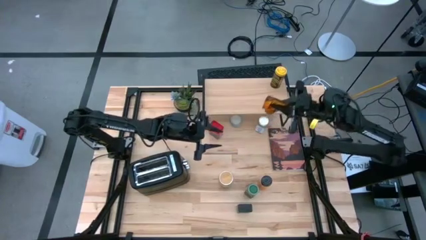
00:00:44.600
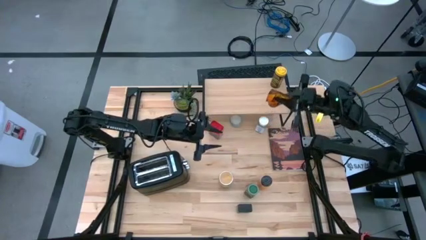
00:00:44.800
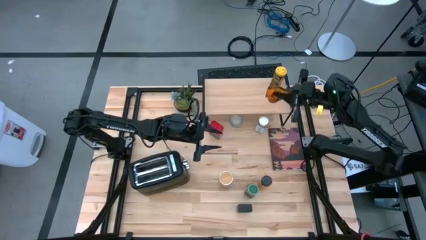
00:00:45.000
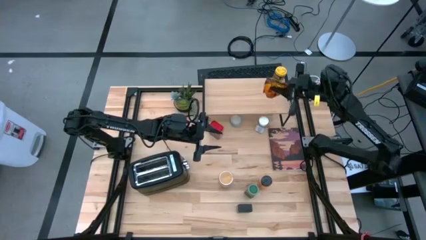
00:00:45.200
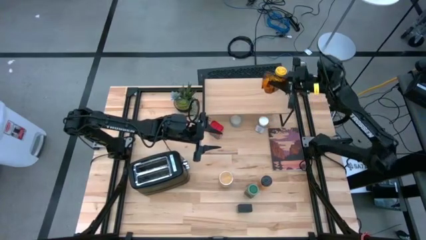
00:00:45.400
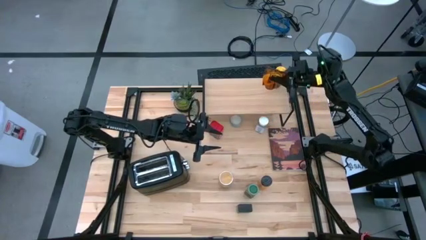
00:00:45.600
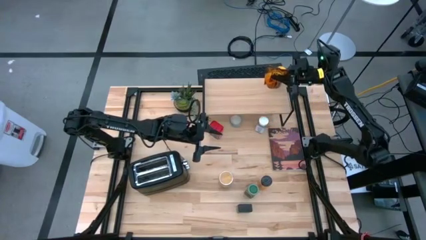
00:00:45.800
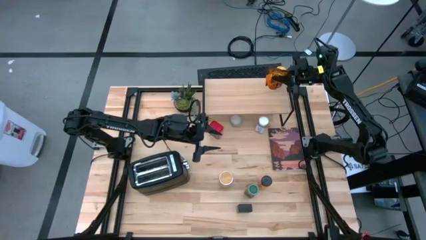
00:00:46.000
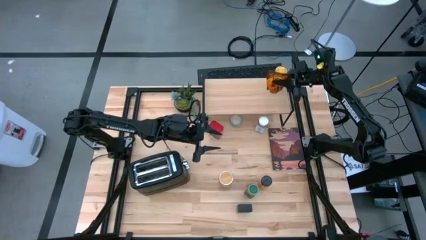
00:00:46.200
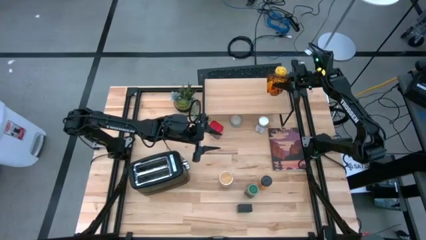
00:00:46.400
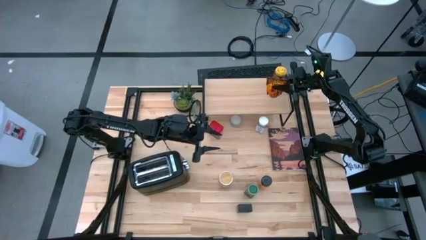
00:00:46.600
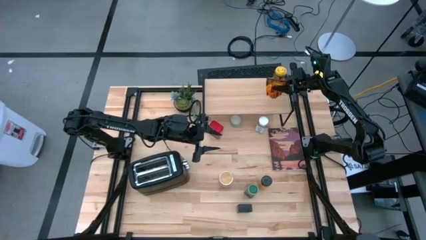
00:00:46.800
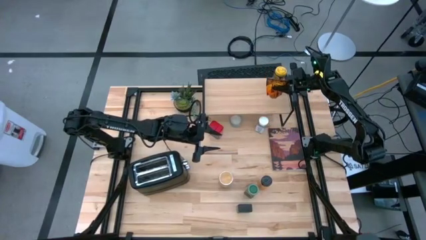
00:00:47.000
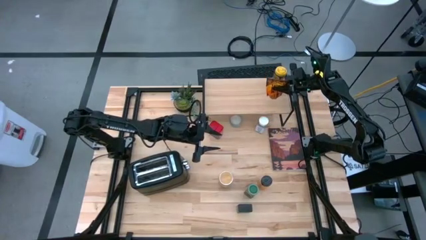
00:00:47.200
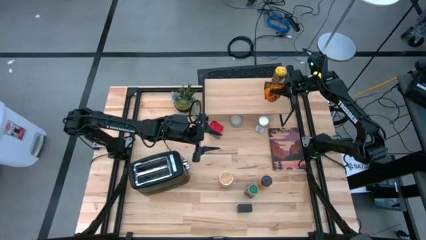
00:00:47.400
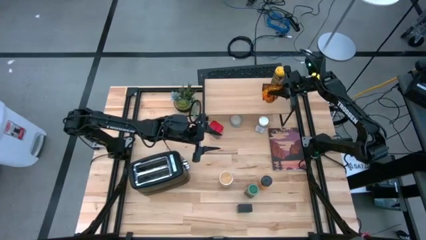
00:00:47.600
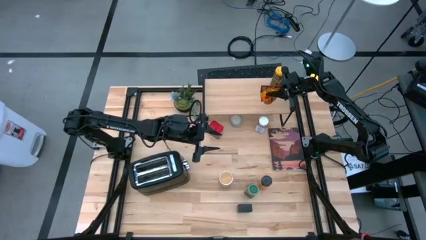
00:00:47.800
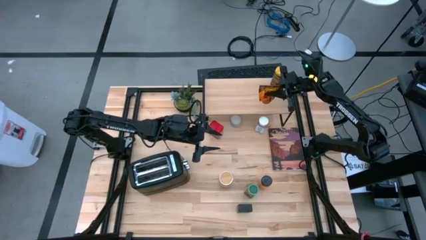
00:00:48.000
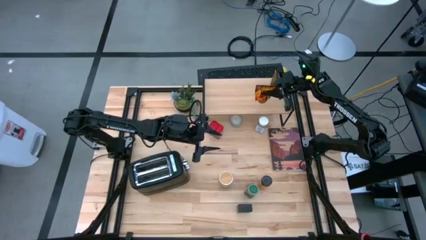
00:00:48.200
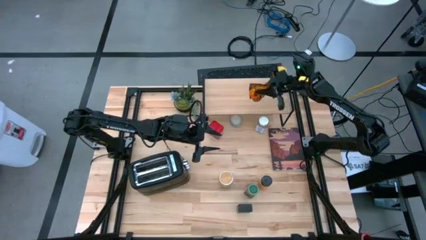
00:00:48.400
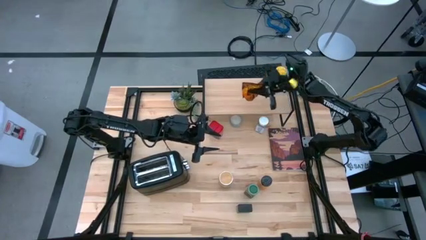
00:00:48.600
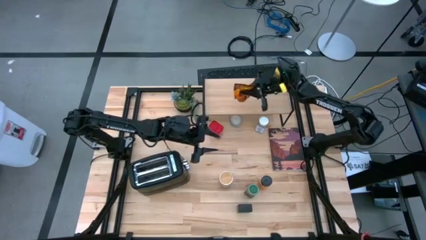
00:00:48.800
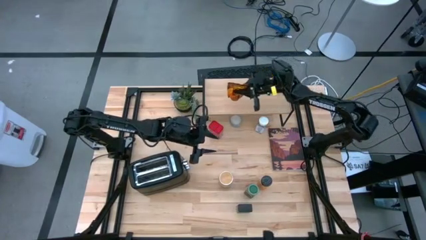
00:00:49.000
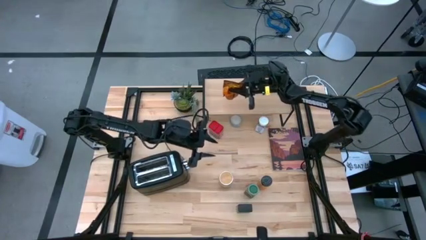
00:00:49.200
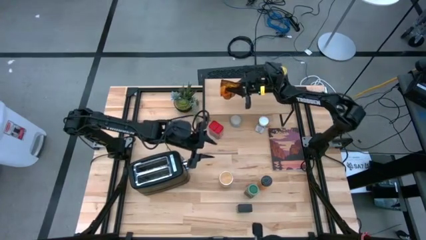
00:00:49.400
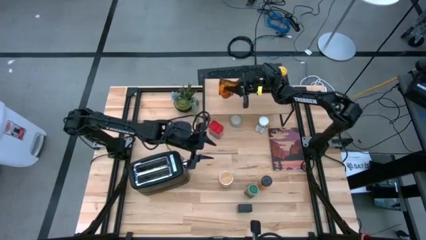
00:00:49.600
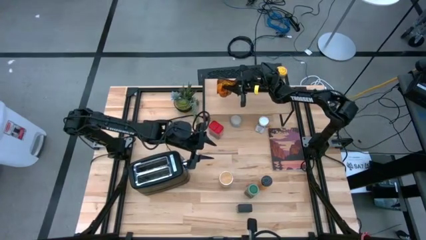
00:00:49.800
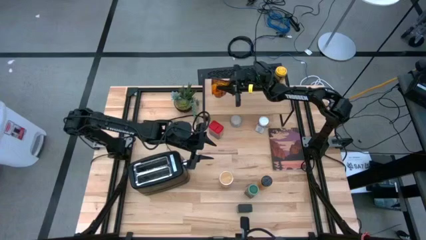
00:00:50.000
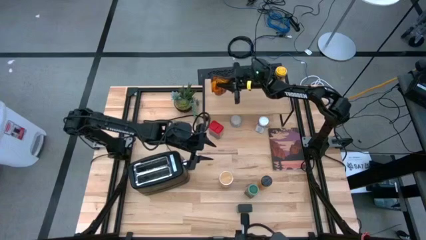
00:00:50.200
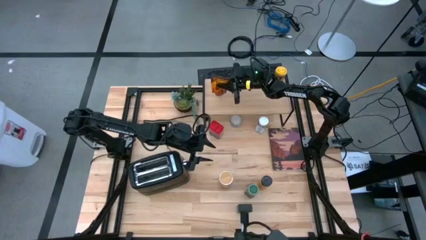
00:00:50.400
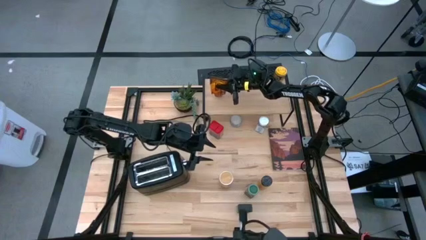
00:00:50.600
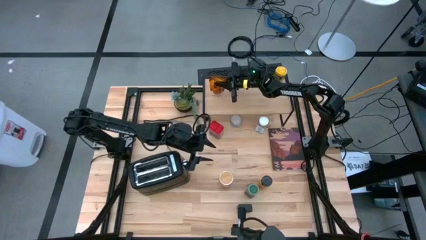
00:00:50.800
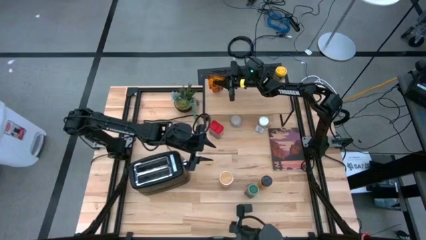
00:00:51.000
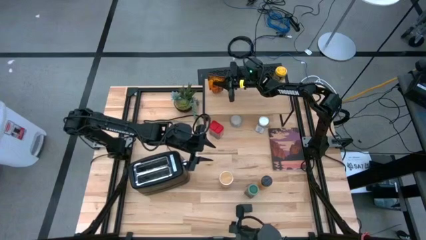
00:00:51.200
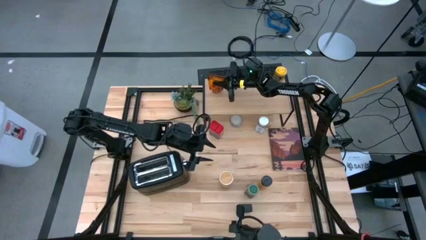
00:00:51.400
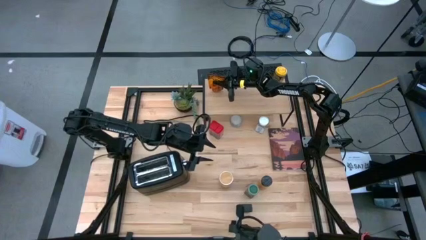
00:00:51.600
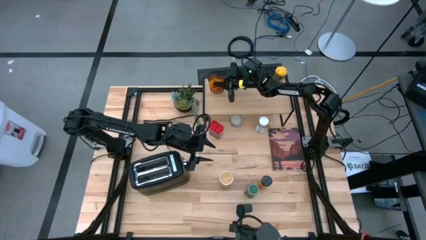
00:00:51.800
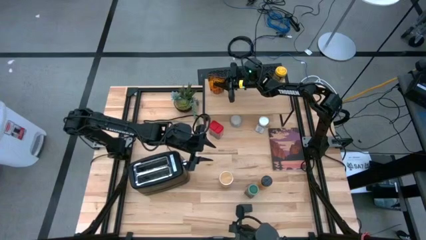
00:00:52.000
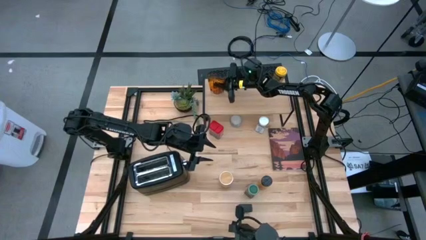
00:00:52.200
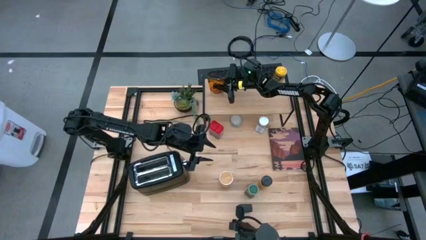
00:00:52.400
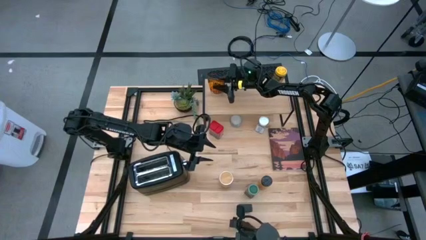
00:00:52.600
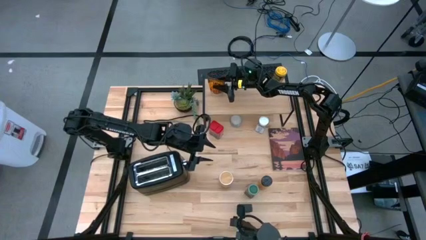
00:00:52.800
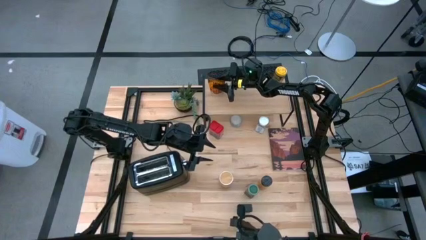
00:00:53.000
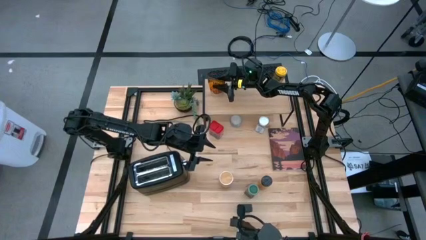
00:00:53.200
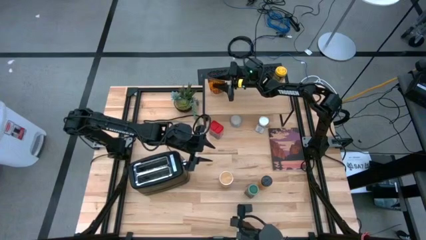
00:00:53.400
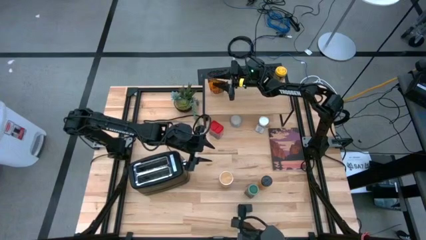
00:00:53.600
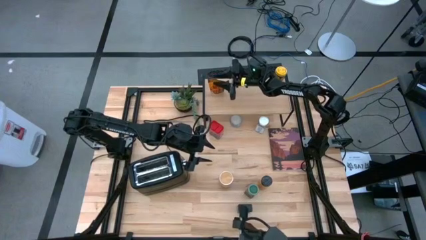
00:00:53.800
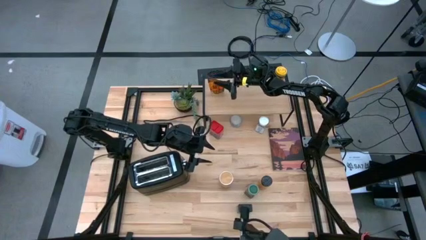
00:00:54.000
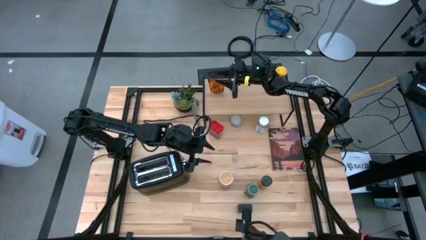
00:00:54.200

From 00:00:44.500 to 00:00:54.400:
Task: Shelf spices
Put the orange seasoning bag on the shelf

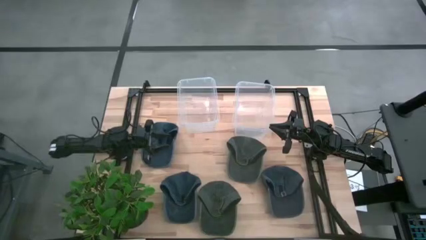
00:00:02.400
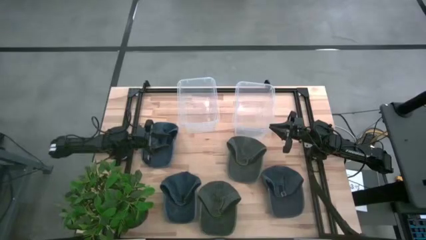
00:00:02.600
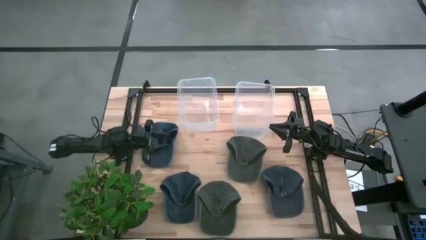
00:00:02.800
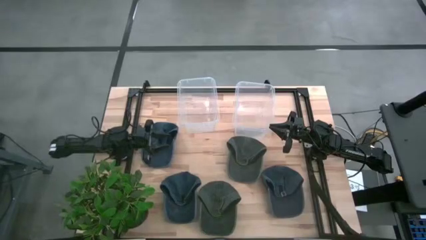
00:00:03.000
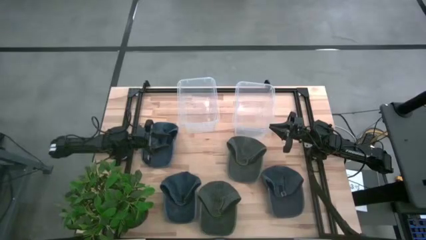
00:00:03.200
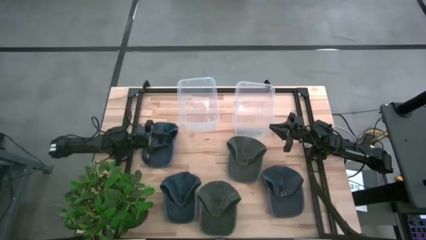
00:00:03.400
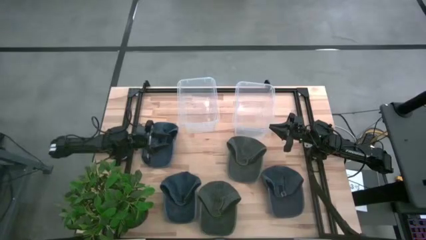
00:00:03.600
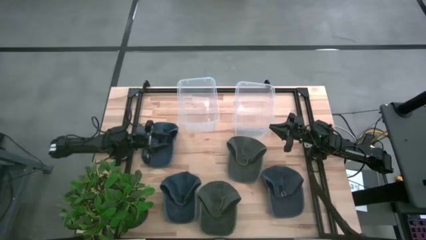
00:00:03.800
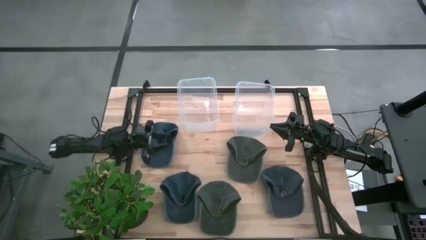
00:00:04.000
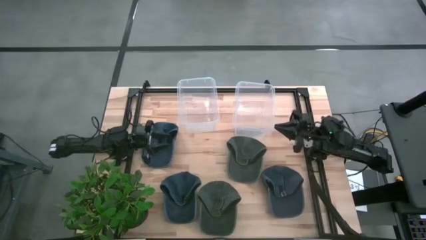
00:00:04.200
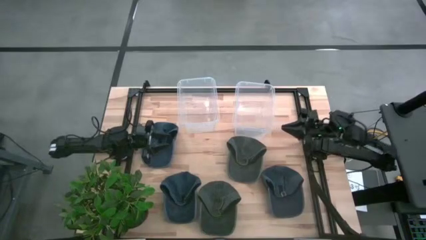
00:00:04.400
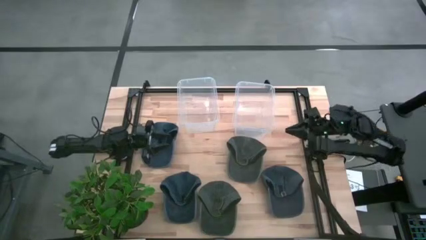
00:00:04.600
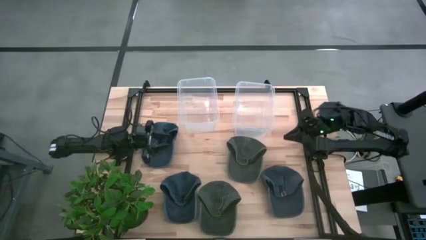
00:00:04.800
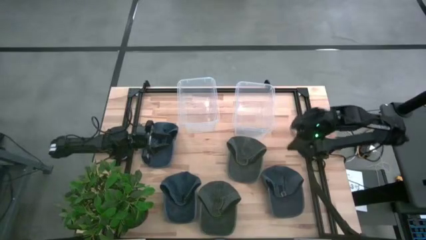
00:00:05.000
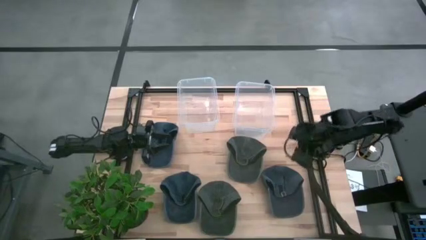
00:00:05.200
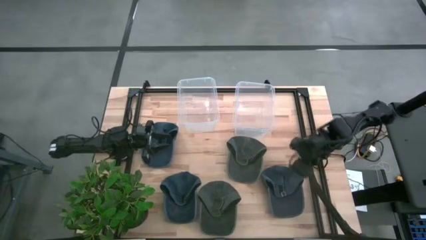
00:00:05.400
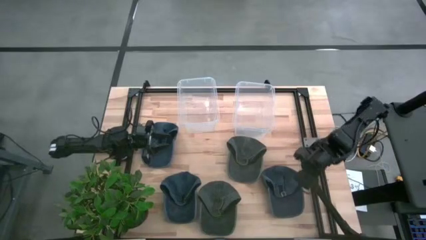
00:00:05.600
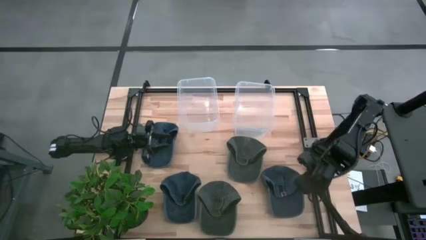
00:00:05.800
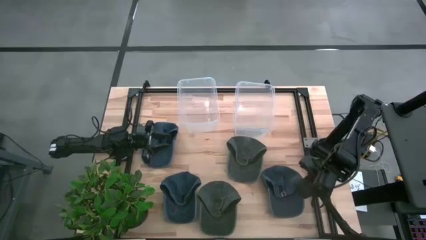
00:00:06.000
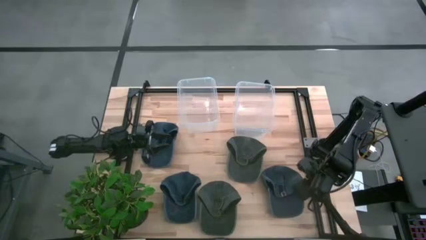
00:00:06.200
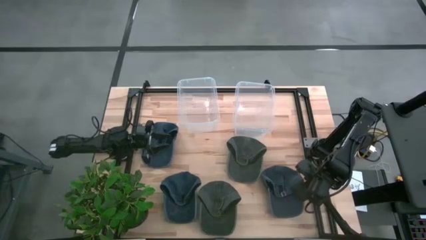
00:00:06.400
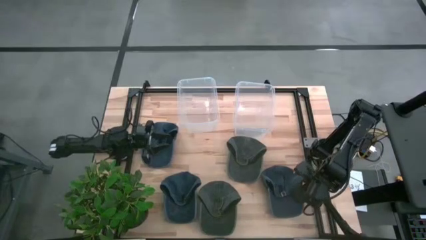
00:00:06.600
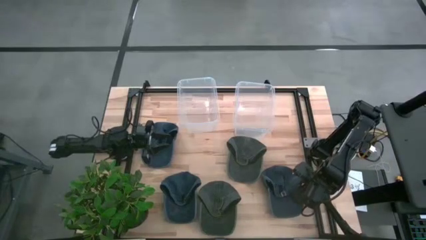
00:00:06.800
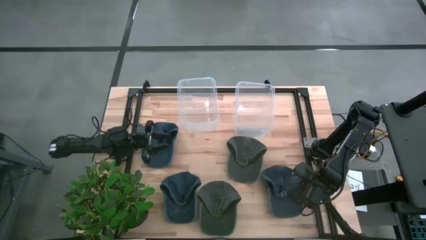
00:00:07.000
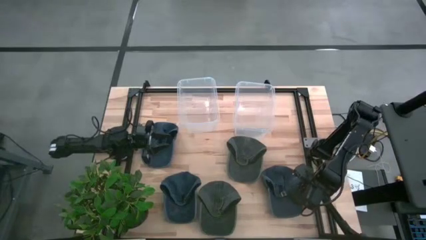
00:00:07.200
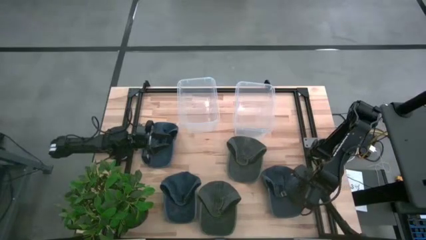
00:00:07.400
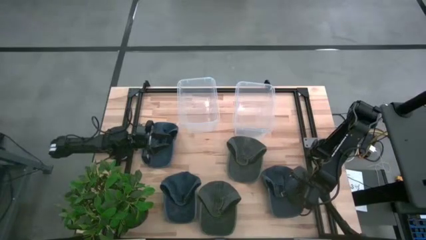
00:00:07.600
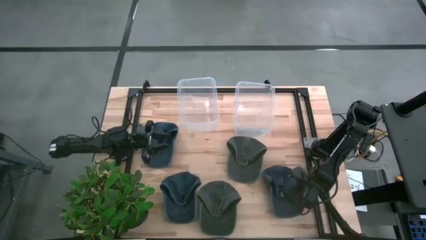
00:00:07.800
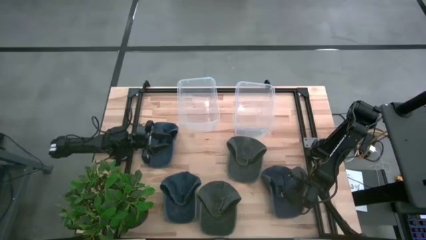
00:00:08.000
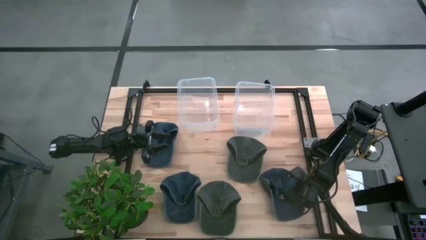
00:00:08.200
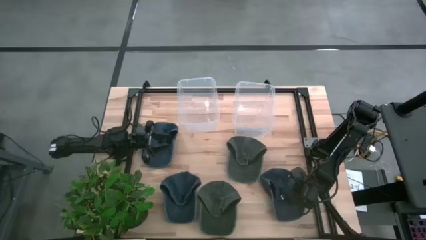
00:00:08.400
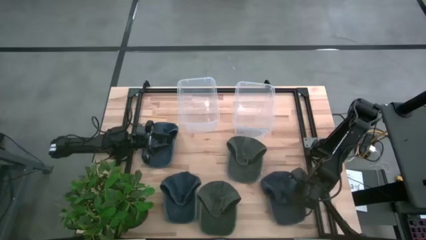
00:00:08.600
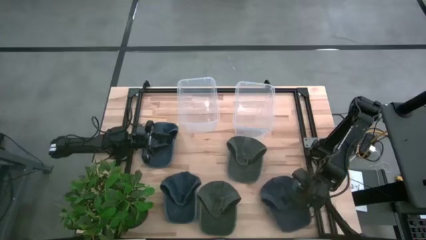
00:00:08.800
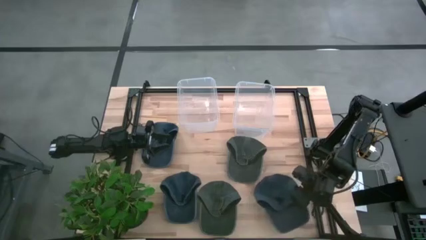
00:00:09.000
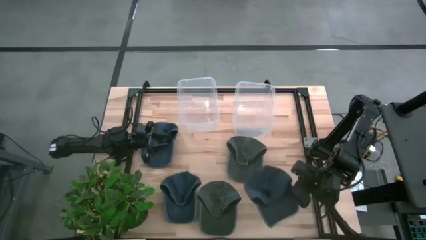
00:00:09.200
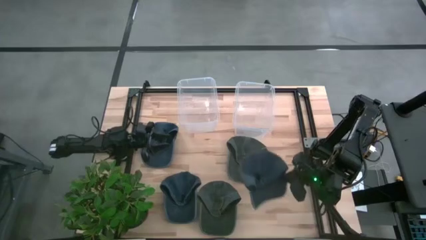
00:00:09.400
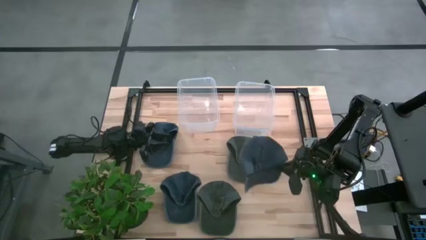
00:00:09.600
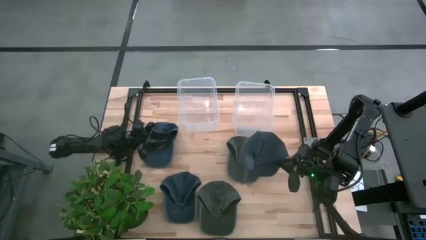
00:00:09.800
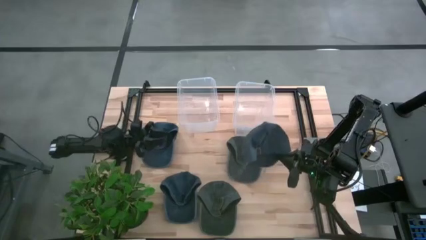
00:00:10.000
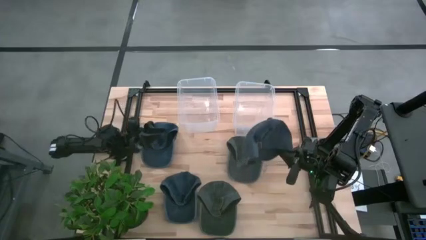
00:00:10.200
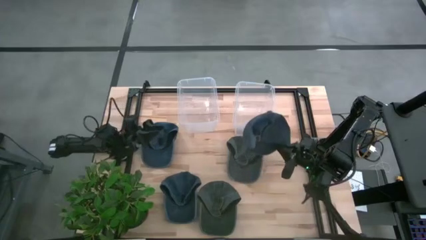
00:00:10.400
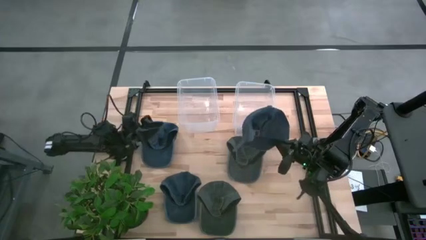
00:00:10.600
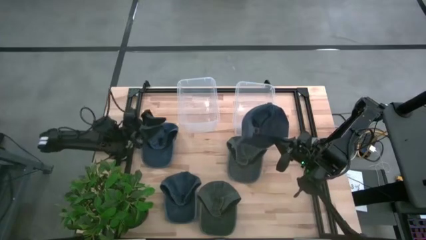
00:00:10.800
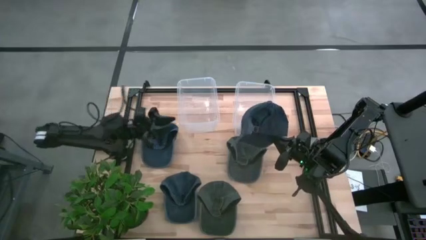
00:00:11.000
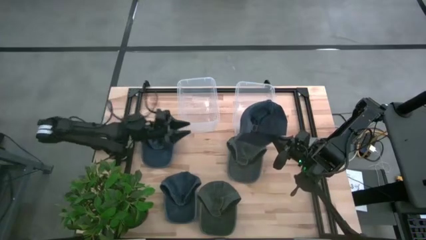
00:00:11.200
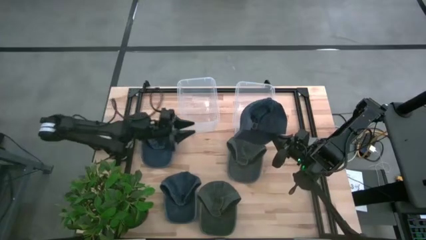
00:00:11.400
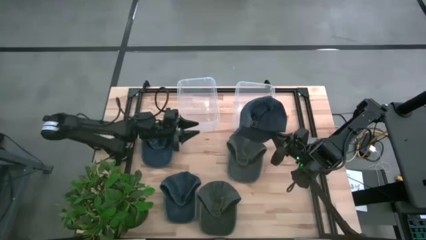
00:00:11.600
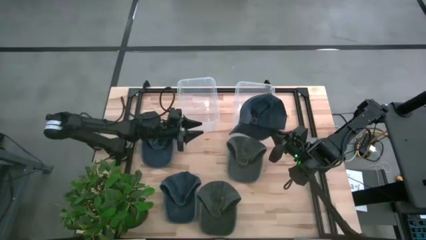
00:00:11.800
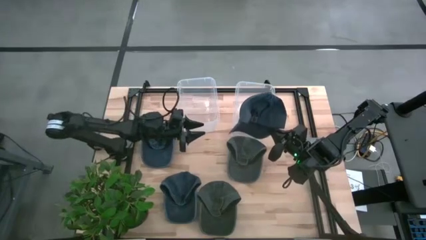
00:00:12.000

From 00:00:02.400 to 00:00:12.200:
Task: Pick & Place hat
Put the bottom right blue cap into the left transparent bin
